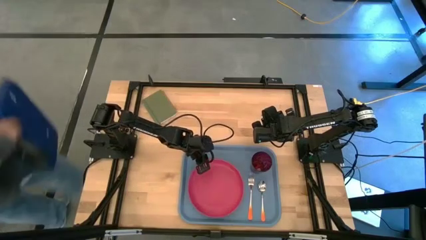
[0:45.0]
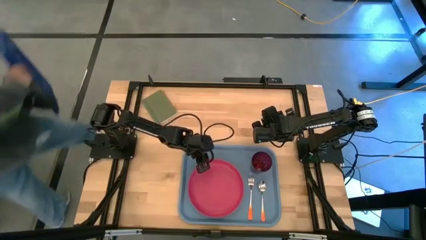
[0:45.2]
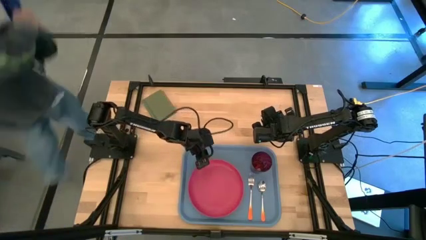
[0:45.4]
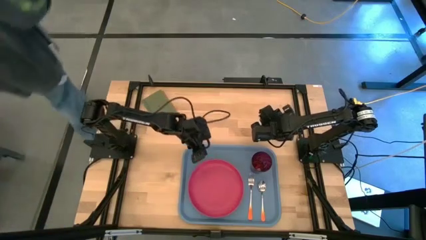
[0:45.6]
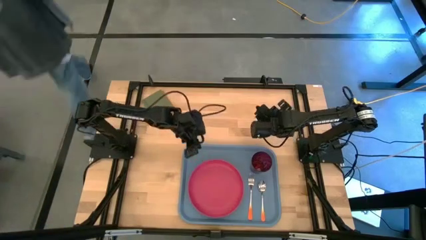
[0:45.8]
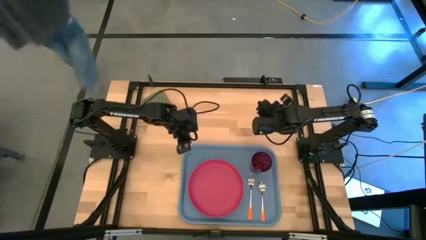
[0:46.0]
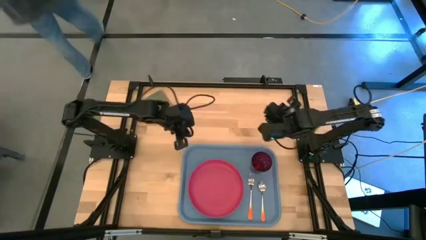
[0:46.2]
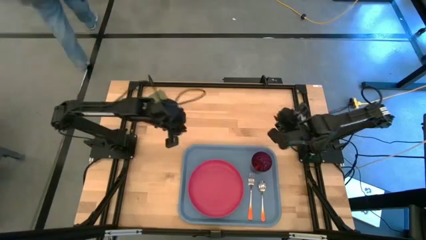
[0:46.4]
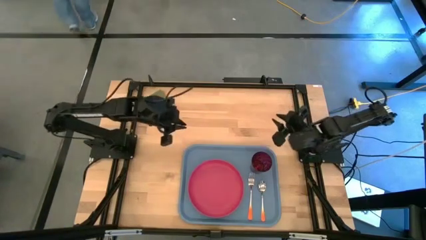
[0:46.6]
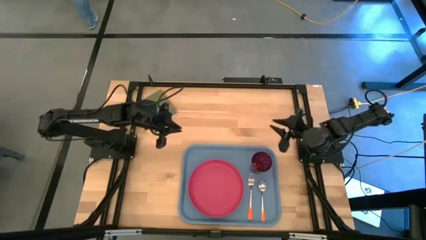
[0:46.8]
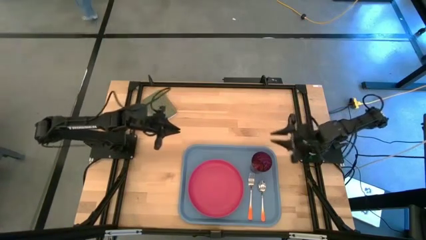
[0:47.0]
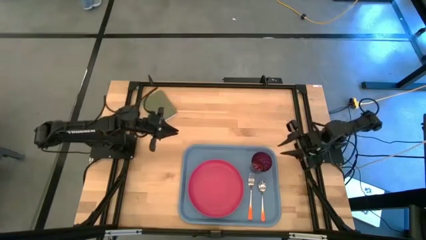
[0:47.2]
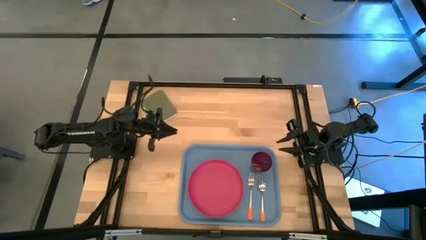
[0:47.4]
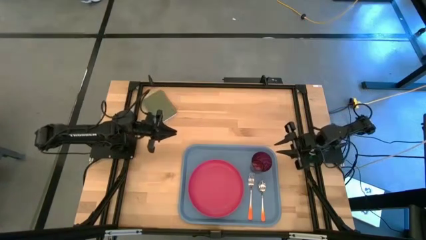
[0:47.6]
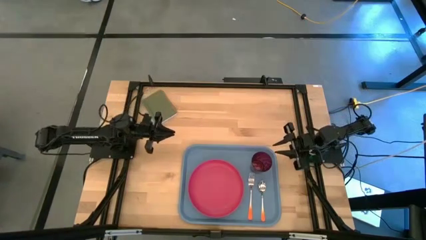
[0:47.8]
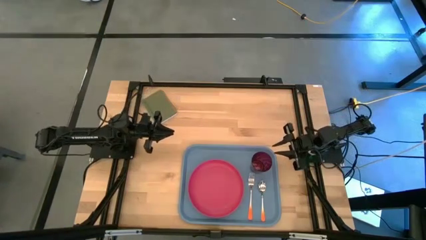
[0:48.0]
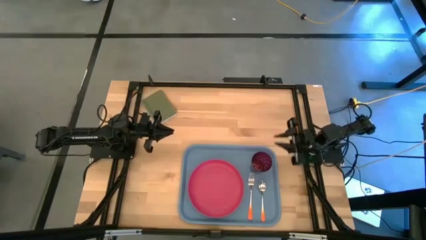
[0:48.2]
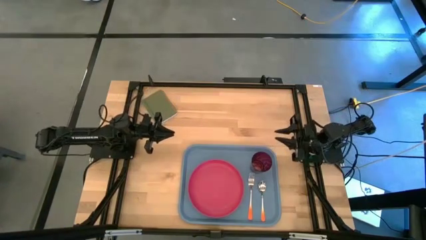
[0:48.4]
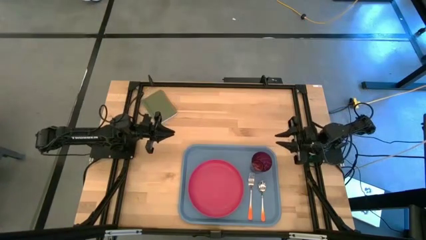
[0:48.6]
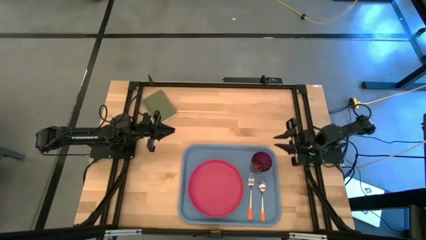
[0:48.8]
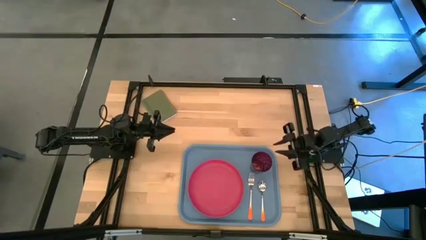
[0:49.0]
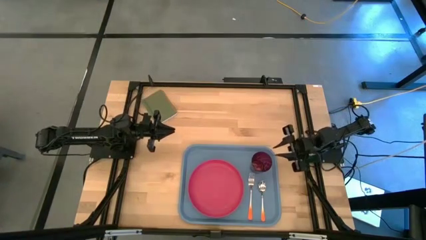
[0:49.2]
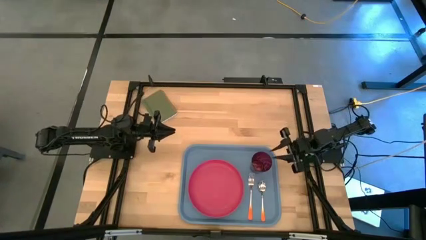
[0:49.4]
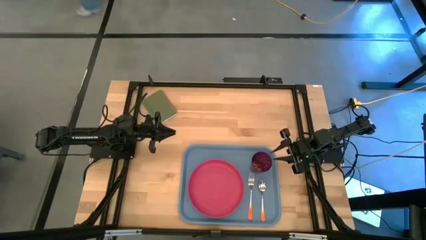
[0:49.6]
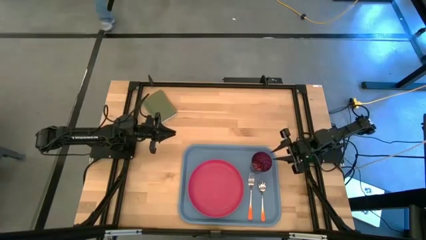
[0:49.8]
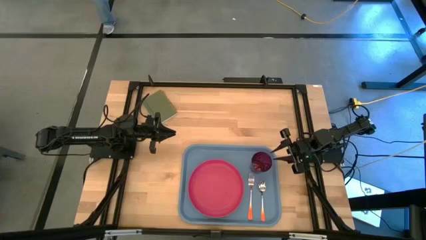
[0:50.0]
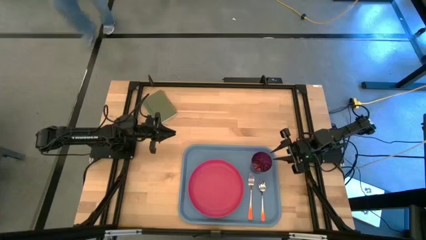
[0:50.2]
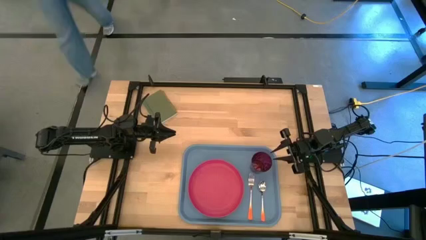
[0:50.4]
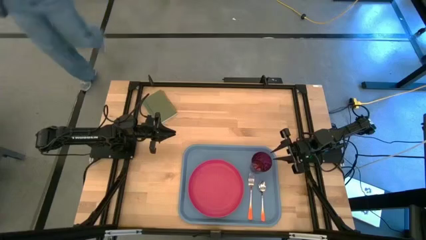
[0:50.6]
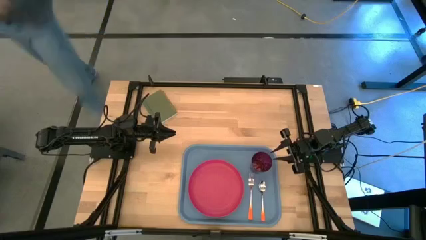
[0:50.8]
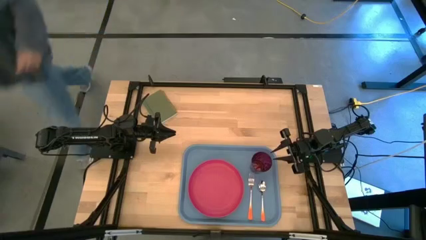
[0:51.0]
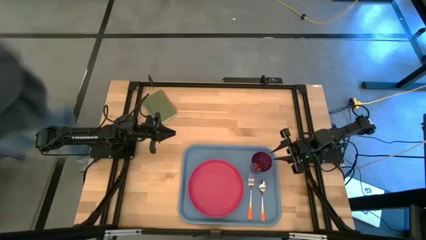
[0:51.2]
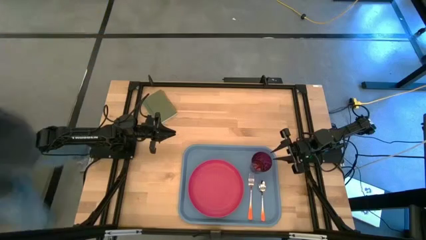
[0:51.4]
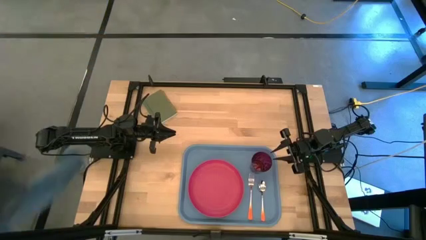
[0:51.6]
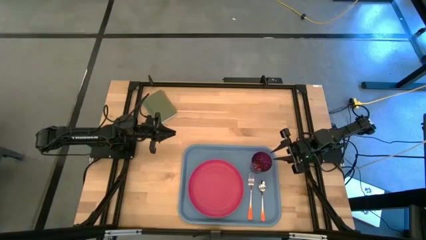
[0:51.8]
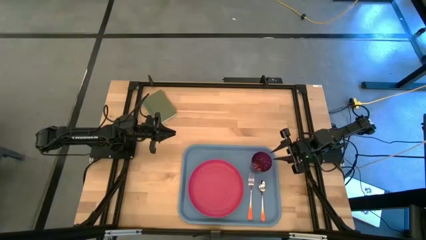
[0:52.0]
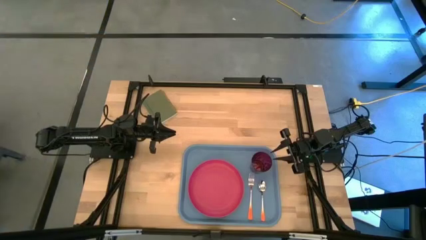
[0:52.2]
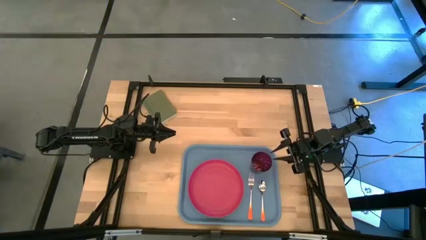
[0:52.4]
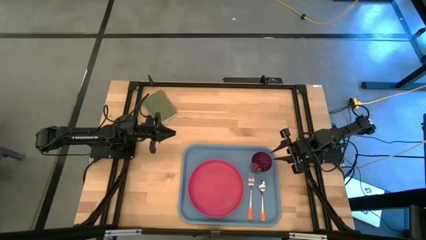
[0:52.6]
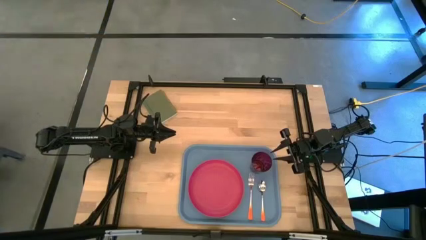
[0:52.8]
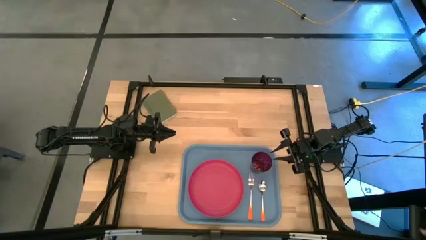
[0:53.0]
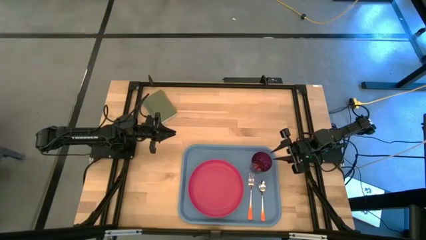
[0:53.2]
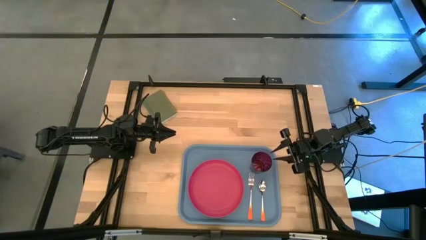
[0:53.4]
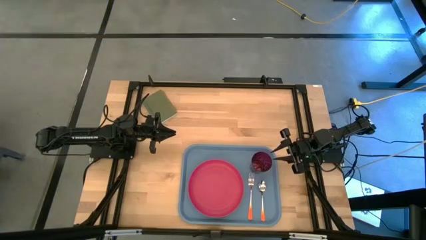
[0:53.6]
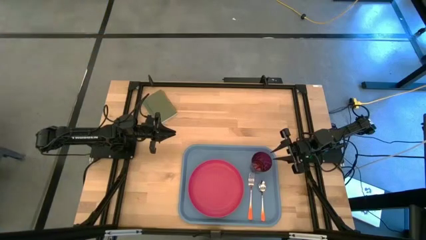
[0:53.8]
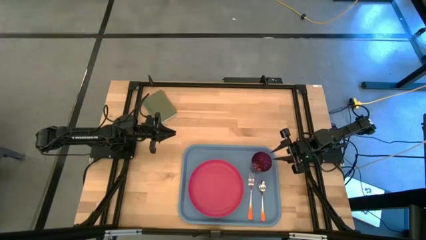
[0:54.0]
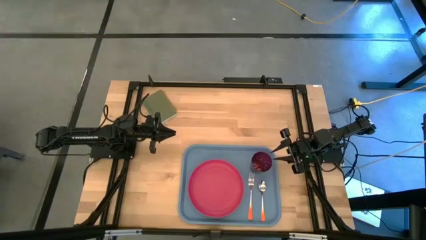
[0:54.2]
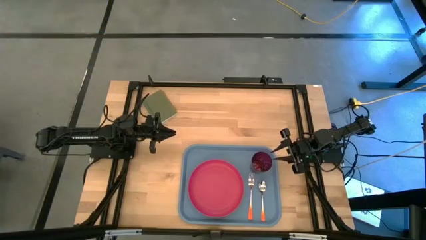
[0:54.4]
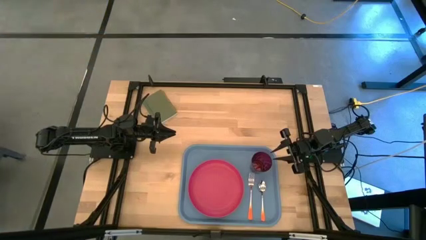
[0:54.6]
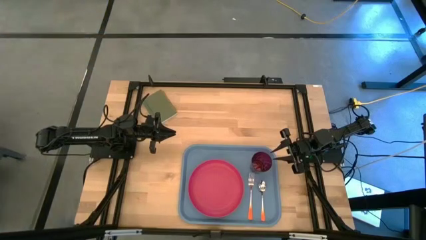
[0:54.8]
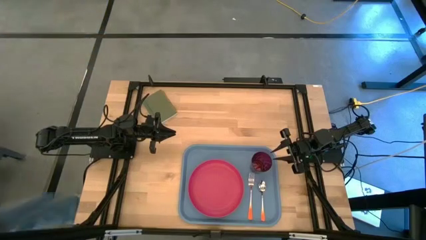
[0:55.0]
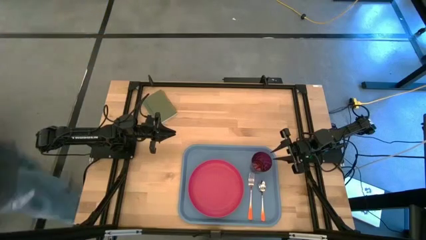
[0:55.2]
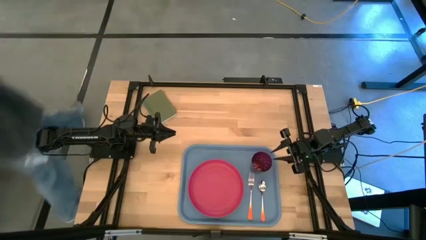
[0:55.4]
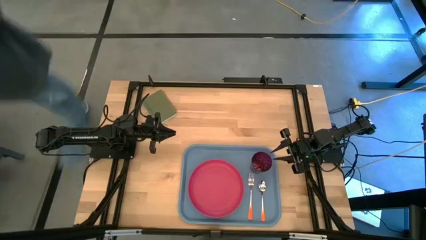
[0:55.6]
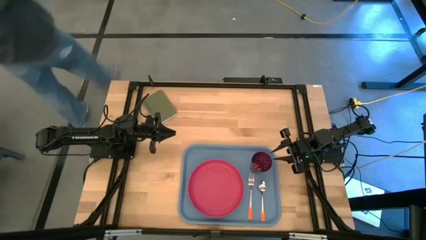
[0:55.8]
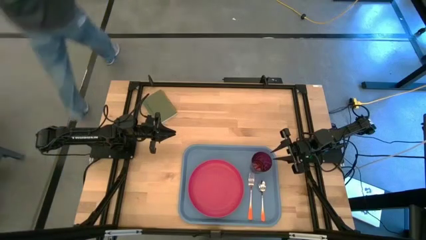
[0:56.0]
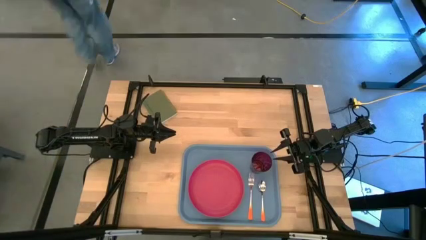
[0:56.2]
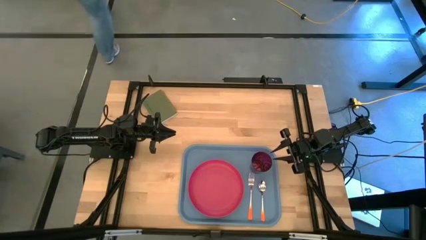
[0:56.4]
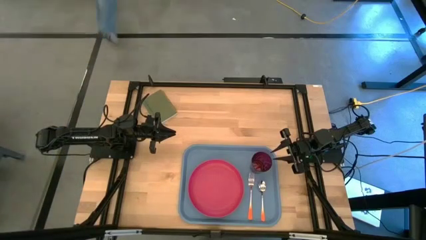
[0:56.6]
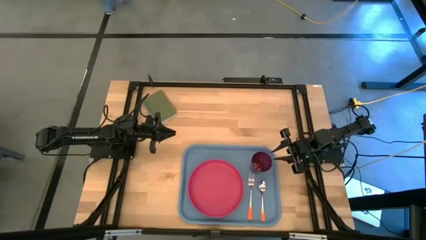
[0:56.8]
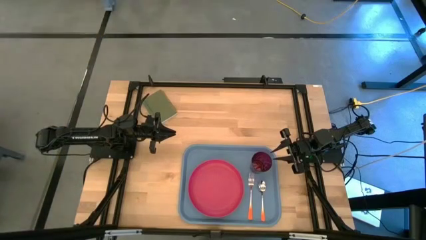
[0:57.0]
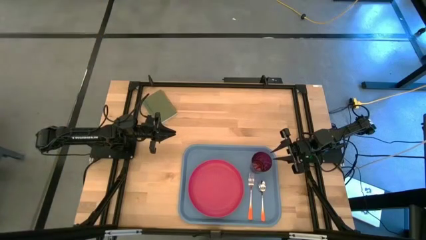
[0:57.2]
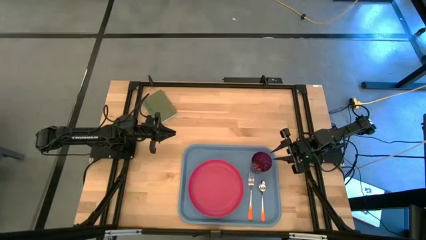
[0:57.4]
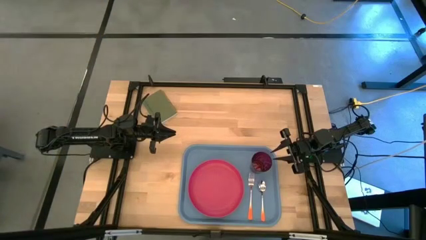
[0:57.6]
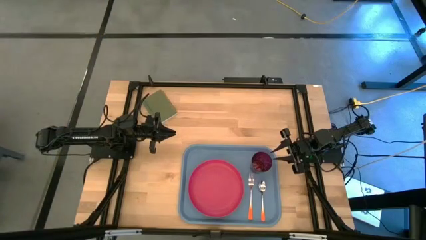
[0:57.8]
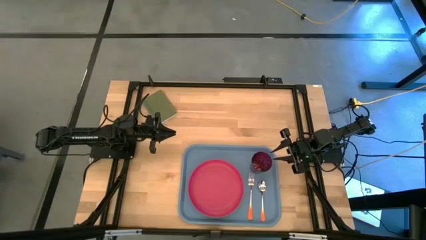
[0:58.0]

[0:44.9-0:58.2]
Task: Pick and place plate/cup/fork/spoon on tray
Return to Home Position
